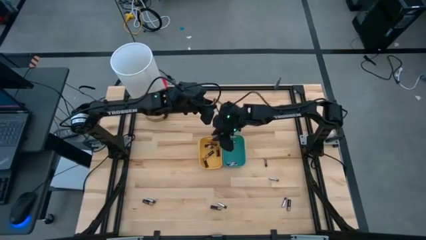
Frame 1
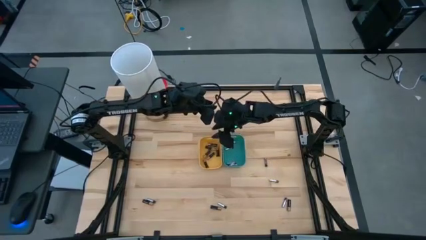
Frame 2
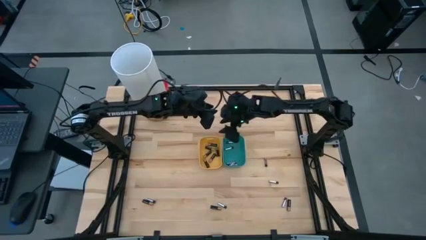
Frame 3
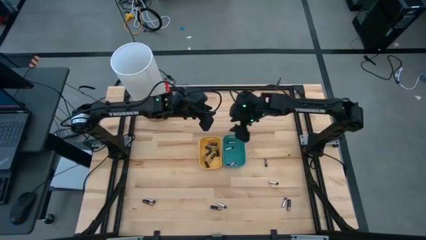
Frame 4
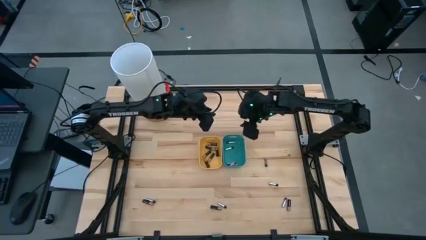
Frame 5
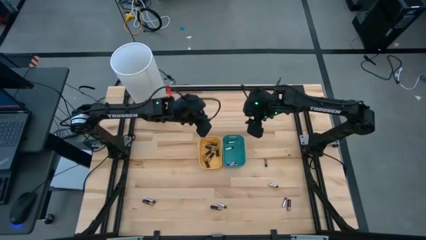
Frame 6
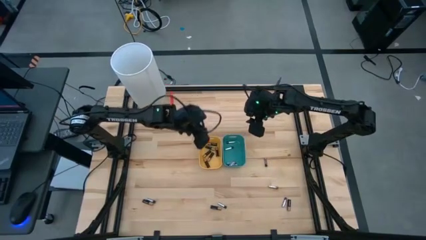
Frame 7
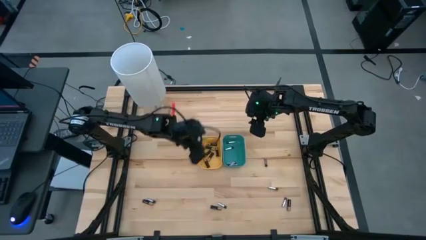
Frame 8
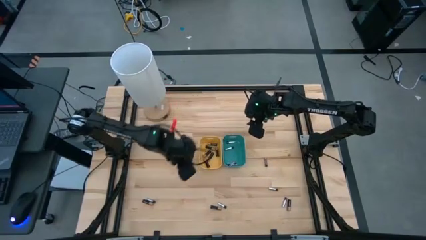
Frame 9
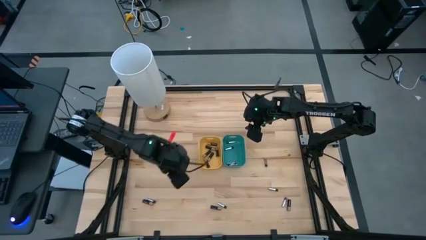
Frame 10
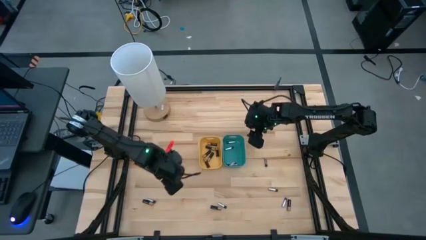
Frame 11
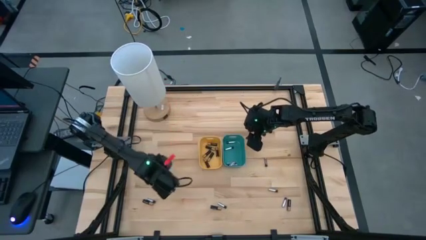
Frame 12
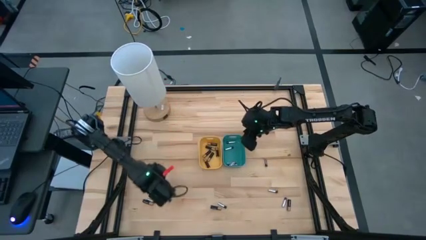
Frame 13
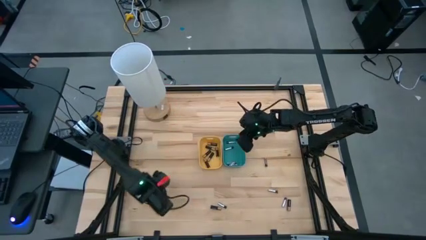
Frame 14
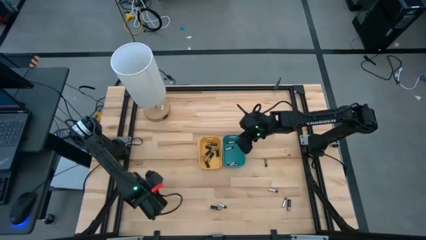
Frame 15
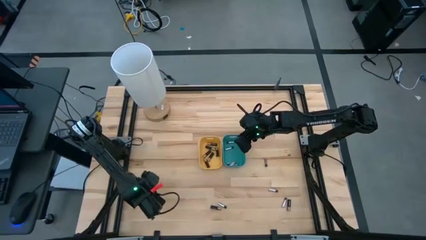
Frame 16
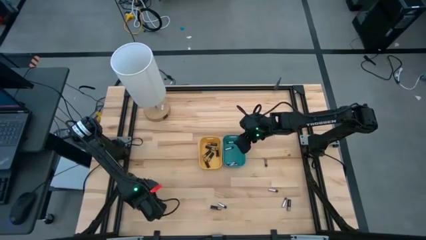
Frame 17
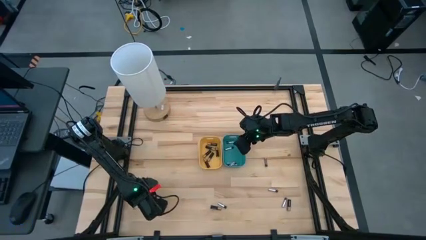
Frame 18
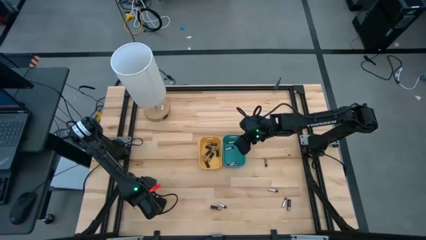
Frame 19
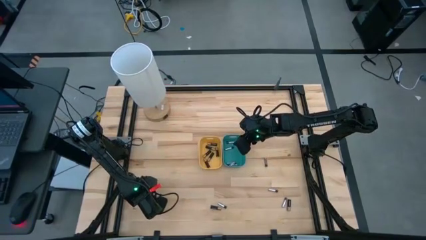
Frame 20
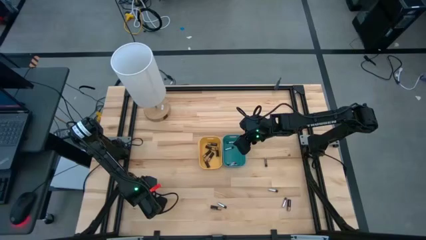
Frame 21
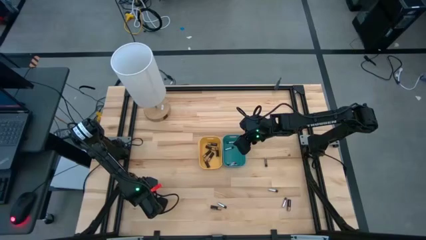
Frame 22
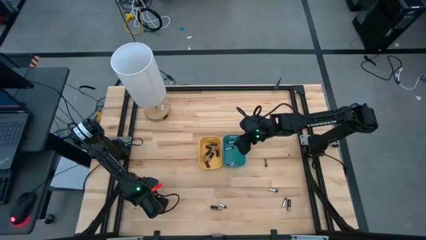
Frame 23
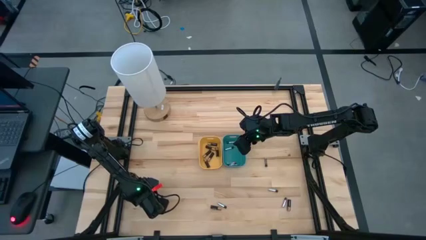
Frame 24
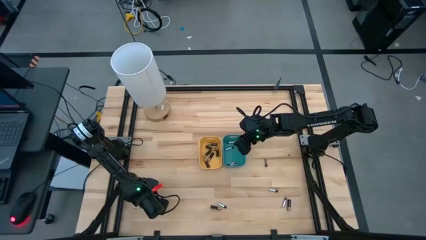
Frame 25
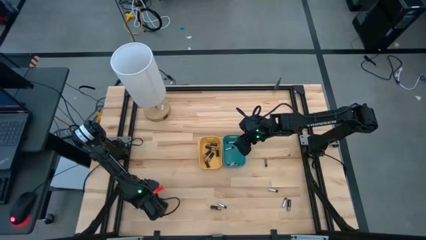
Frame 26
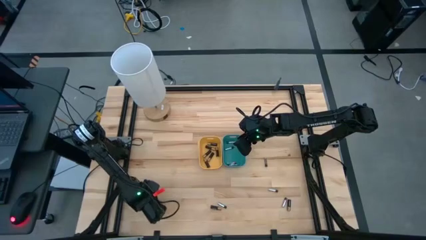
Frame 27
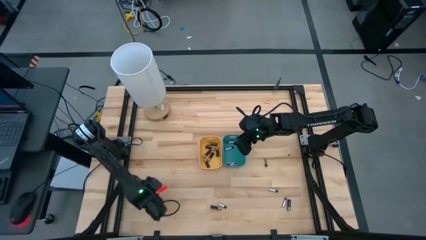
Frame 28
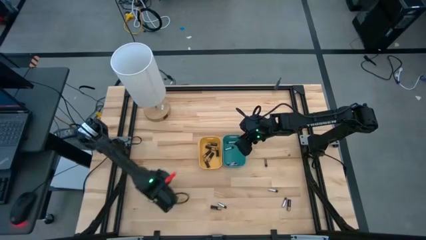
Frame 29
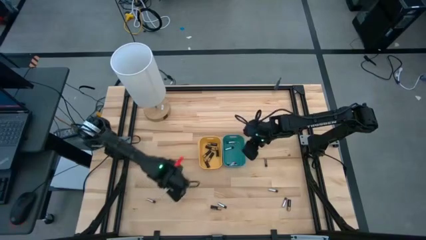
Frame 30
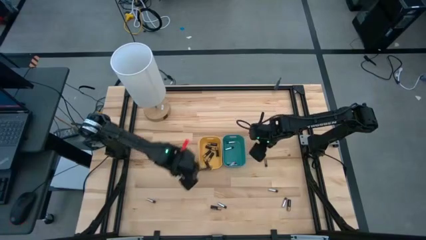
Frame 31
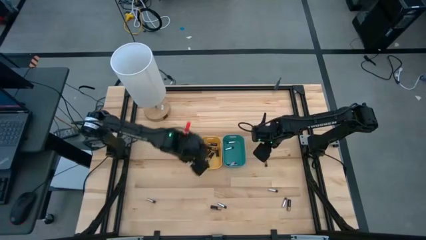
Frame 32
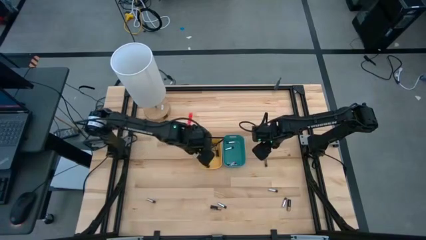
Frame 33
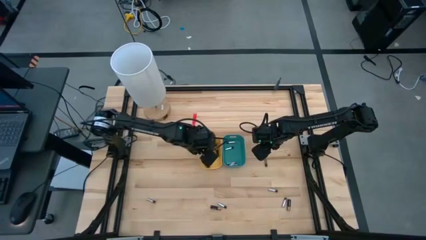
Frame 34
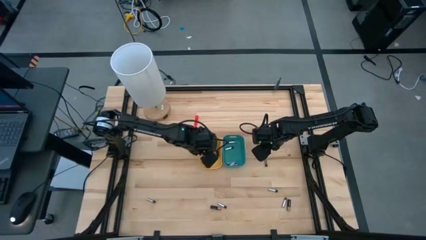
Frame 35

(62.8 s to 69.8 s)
Task: Sort batteries
Put the black battery into the yellow bin

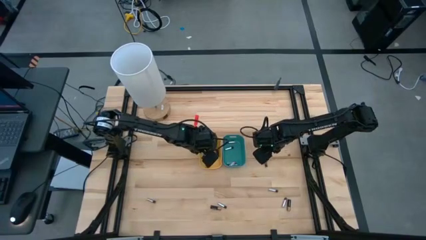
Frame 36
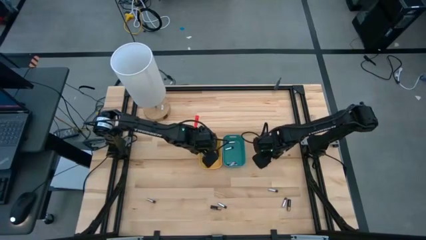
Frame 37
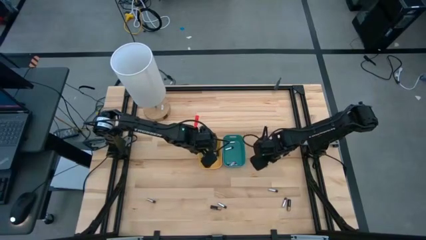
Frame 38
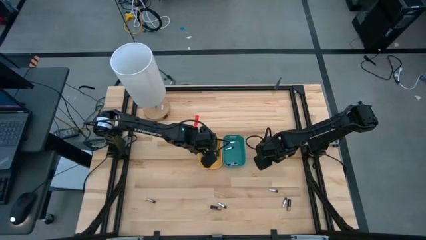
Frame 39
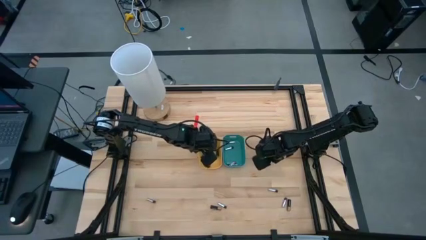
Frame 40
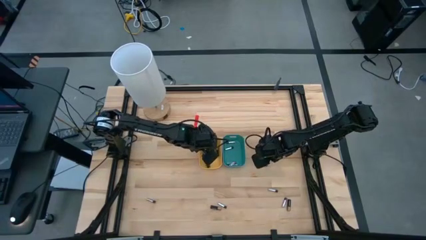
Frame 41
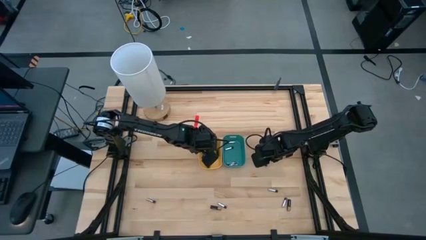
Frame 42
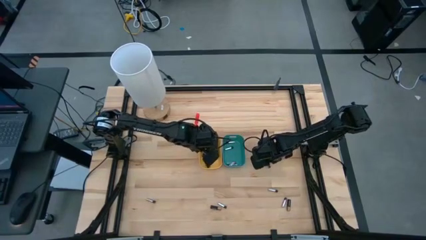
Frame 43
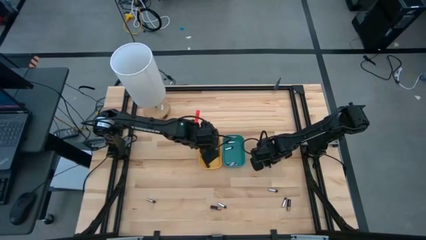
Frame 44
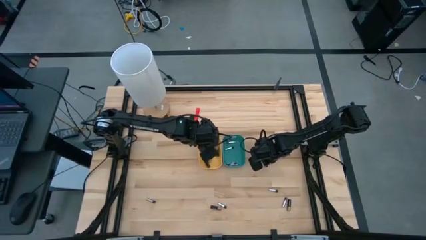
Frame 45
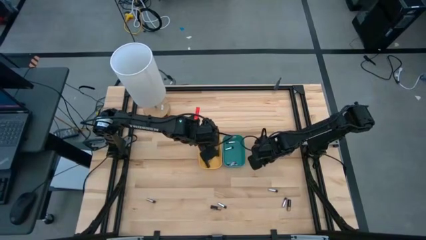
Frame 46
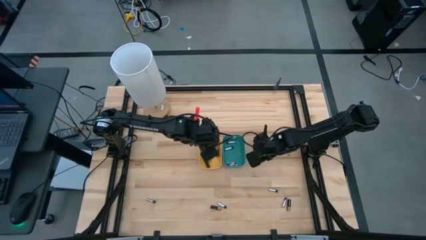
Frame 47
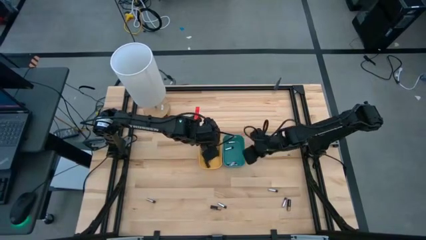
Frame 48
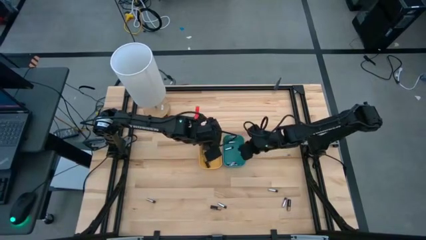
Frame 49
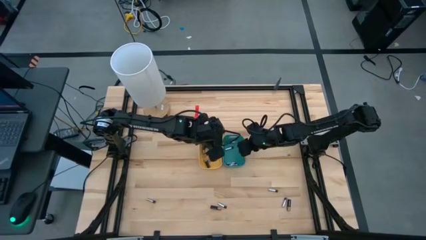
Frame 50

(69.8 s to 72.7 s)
Put the silver battery into the blue bin

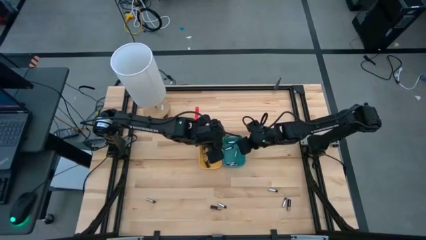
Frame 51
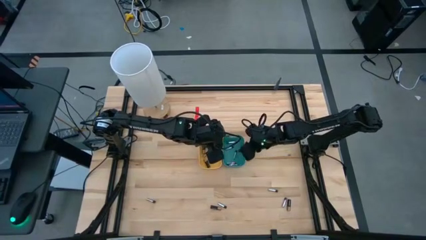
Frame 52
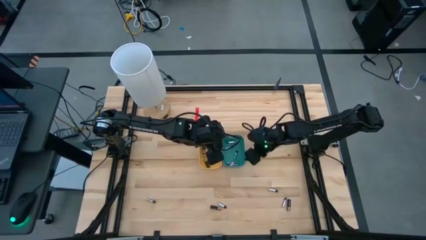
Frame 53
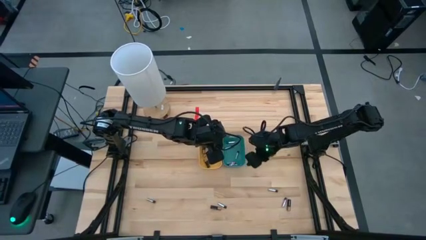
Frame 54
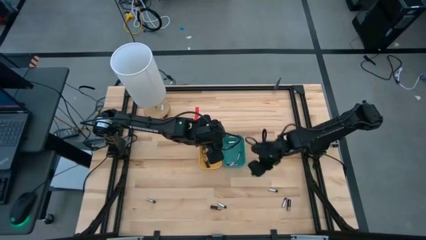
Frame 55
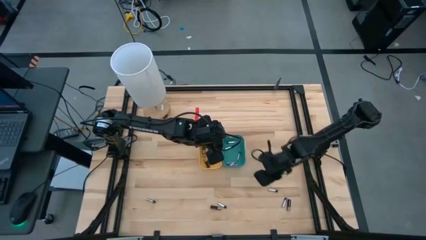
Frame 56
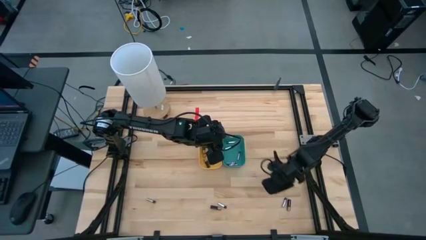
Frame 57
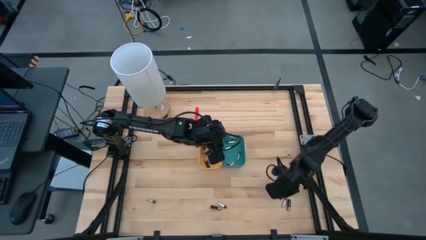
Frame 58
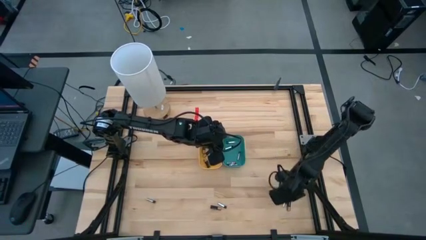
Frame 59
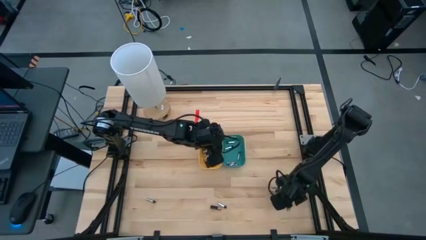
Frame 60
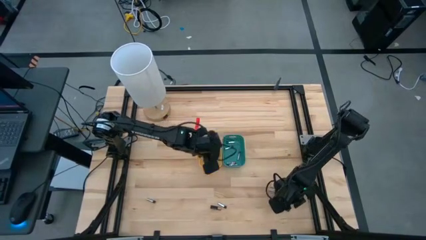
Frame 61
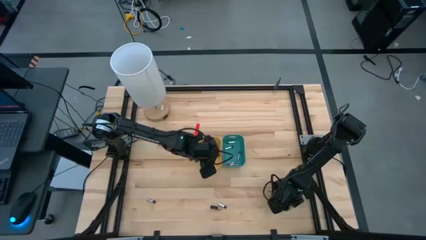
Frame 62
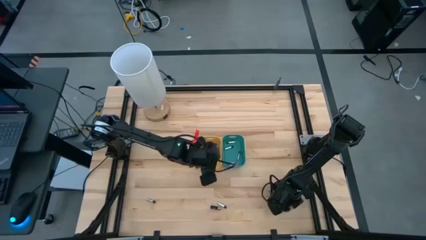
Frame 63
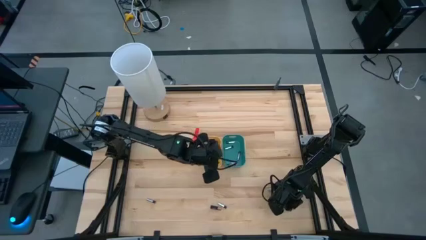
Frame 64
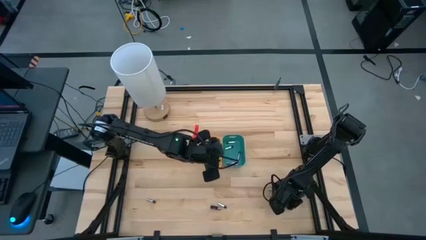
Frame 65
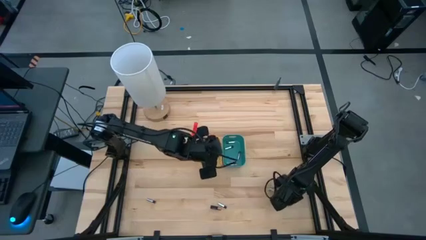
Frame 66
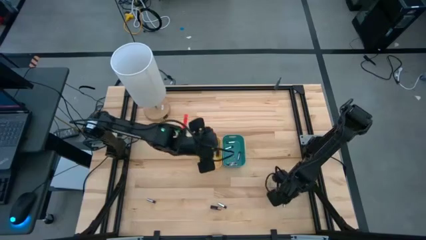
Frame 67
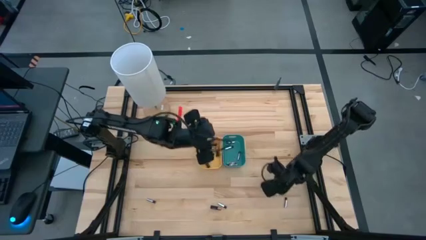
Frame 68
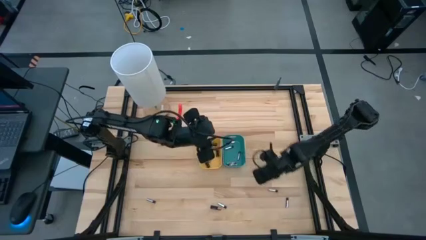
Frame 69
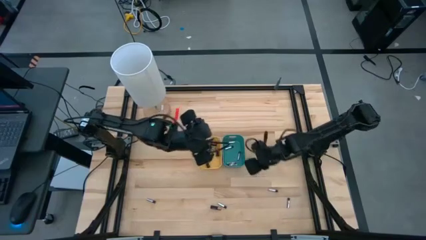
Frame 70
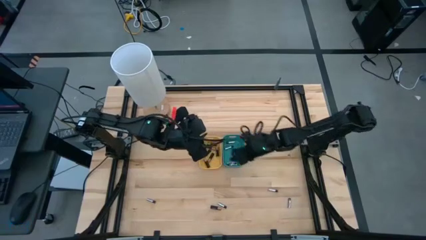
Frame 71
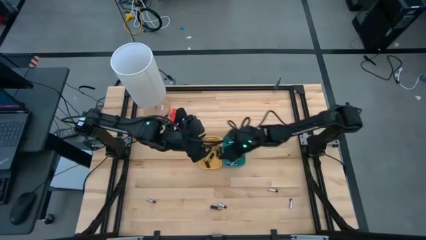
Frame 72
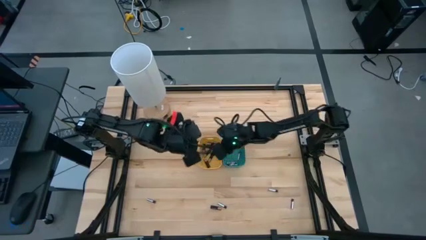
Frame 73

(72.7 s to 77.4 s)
Put the black battery into the yellow bin

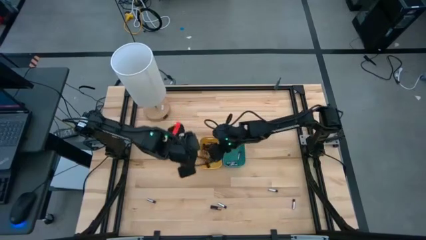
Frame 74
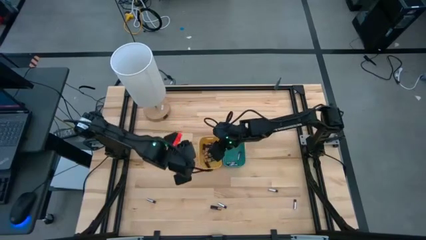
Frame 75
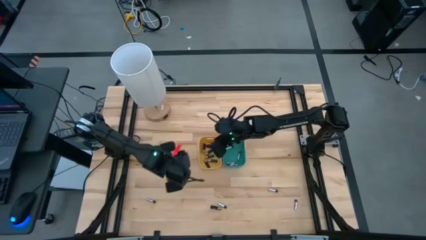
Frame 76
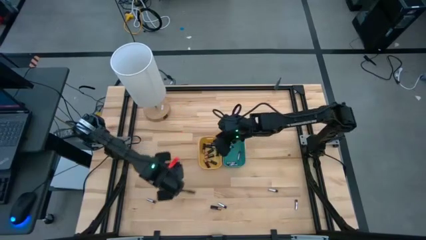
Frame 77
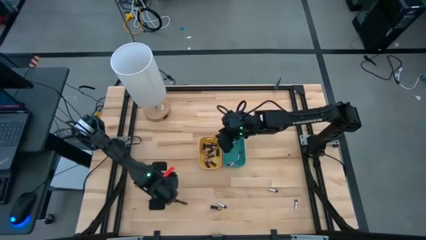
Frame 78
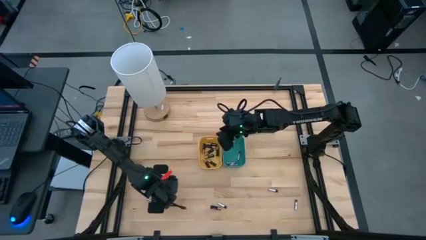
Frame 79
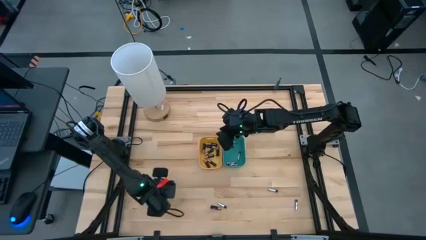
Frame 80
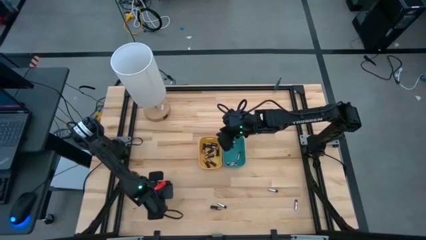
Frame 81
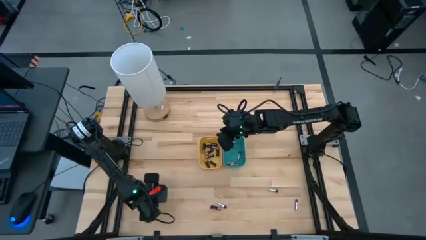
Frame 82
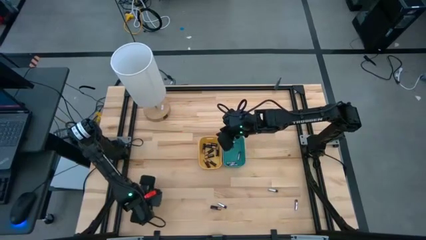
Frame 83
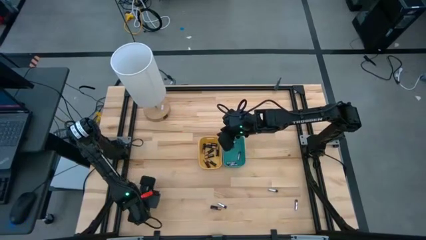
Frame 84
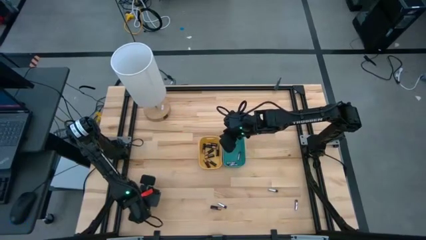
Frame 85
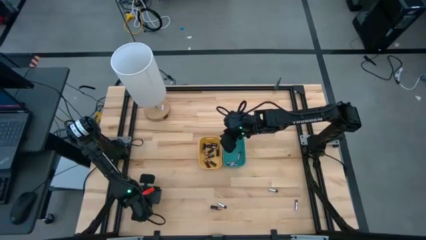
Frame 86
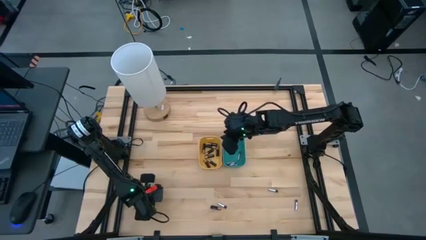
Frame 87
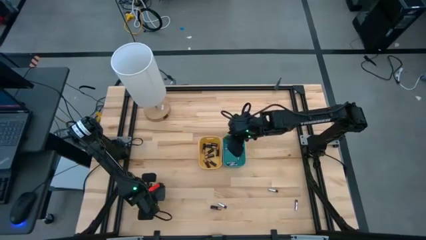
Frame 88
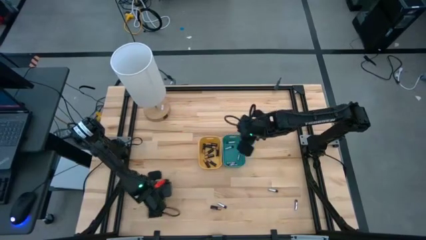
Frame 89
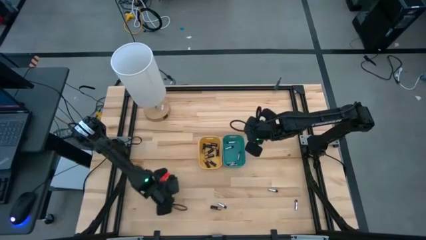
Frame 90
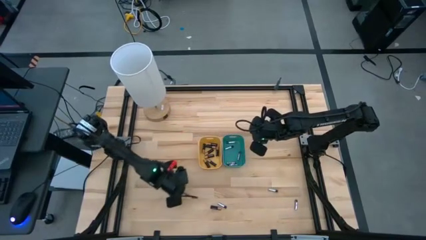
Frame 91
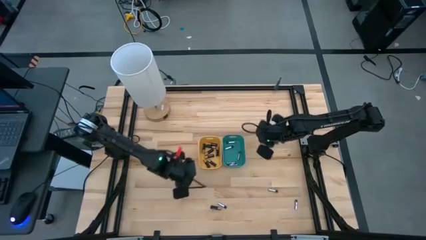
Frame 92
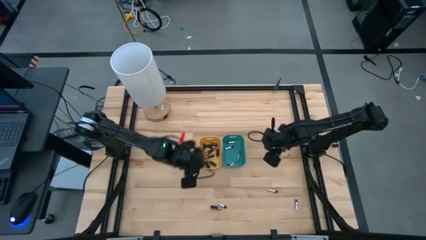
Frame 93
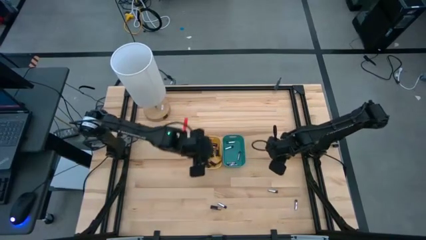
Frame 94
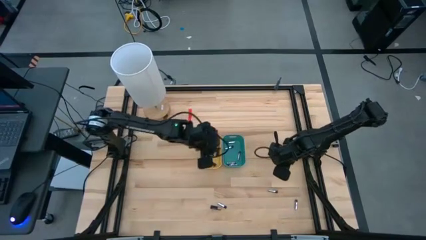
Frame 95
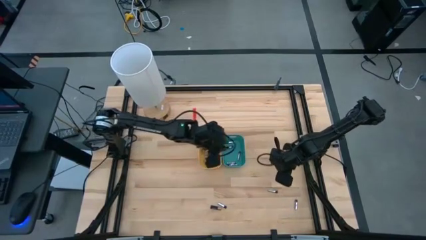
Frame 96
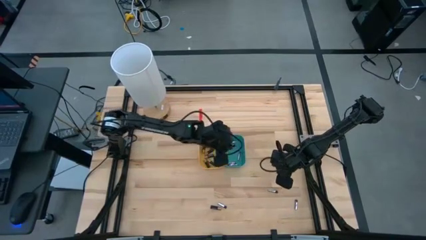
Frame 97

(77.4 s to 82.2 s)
Put the silver battery into the blue bin
